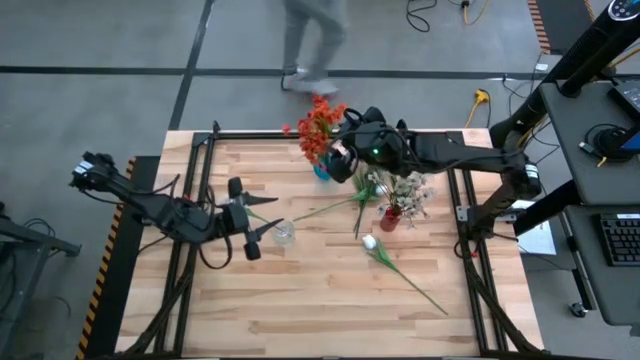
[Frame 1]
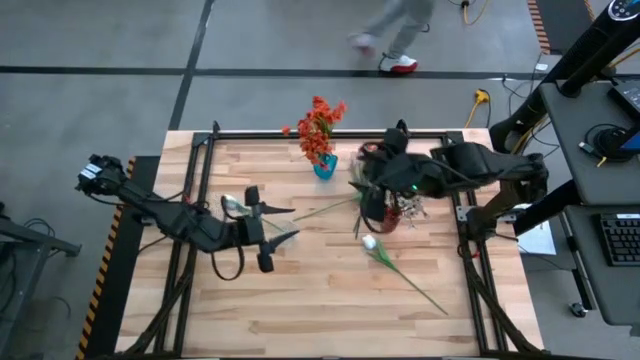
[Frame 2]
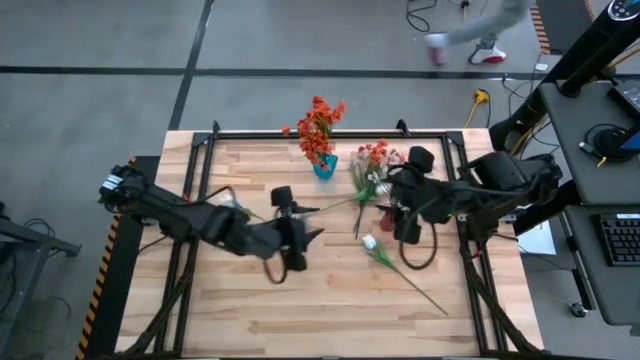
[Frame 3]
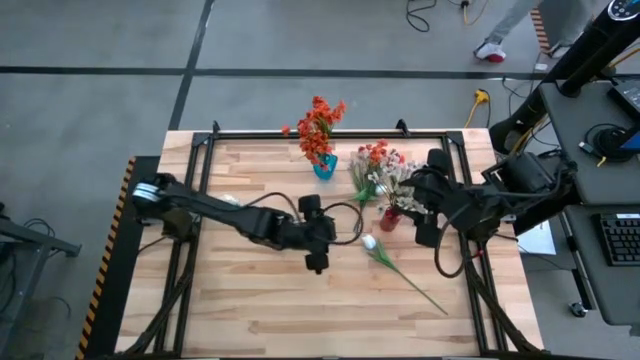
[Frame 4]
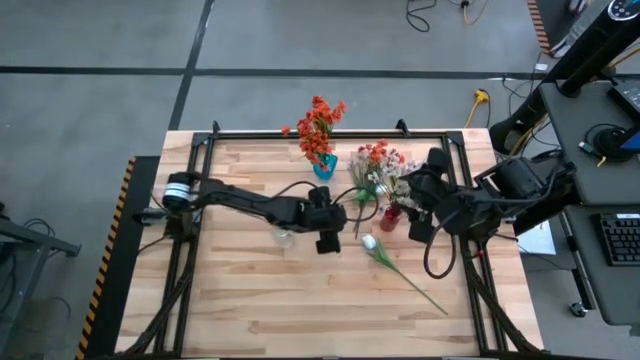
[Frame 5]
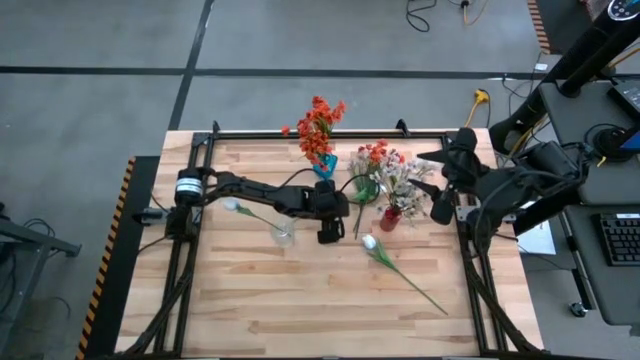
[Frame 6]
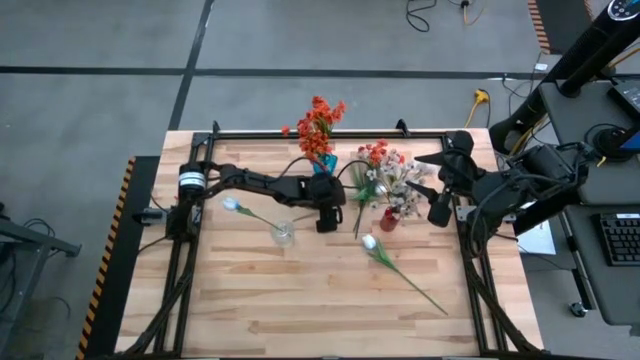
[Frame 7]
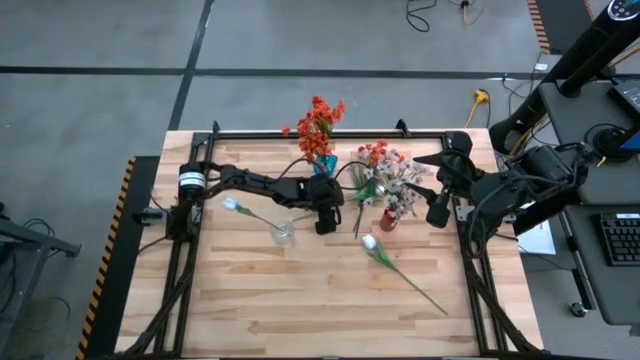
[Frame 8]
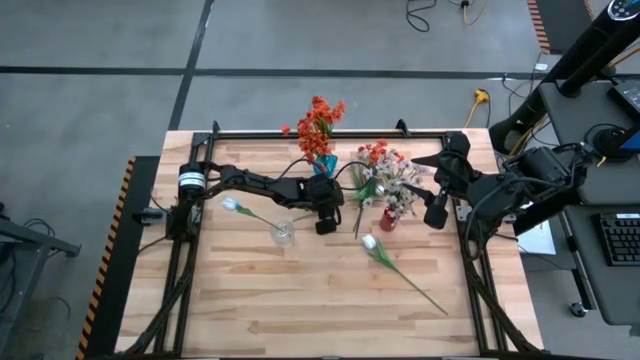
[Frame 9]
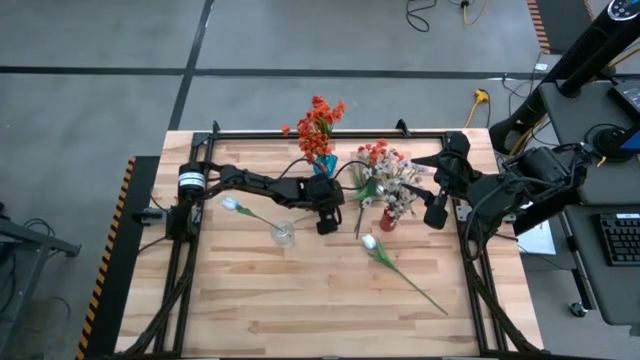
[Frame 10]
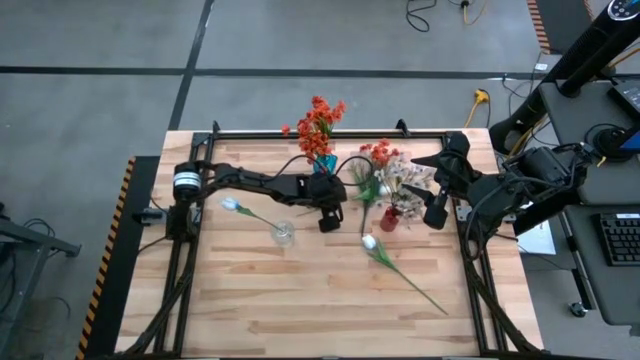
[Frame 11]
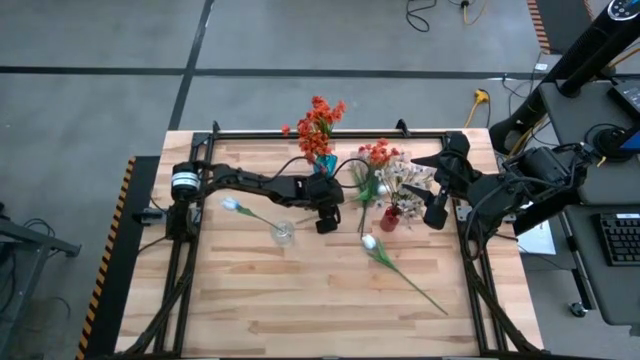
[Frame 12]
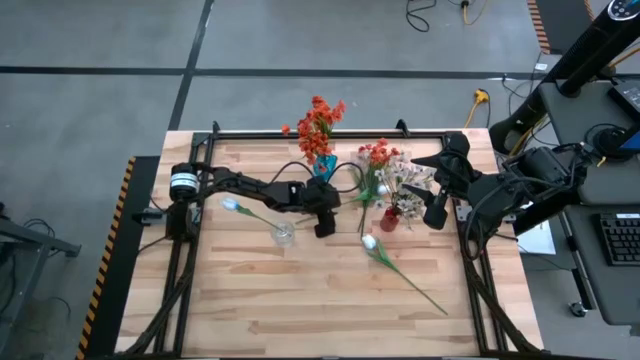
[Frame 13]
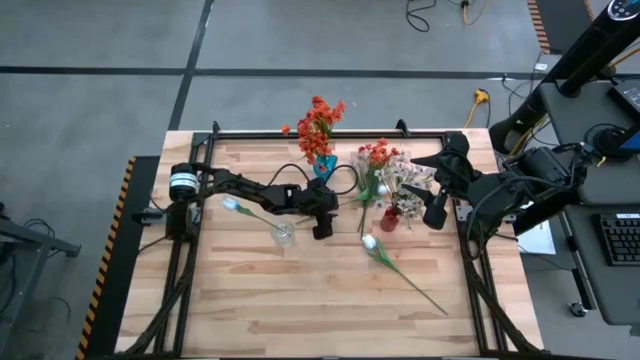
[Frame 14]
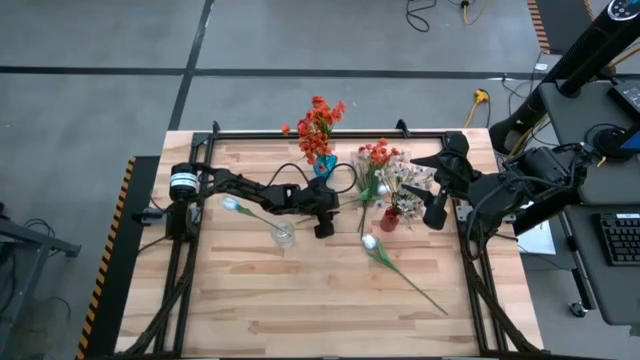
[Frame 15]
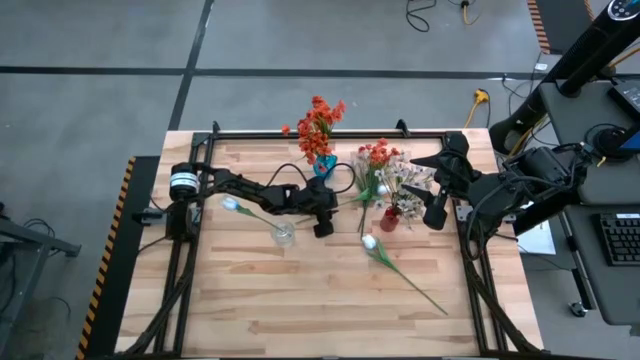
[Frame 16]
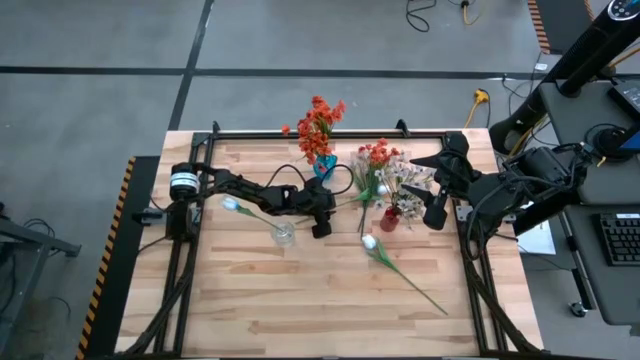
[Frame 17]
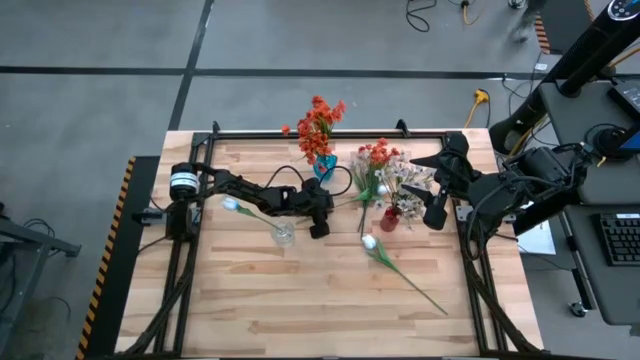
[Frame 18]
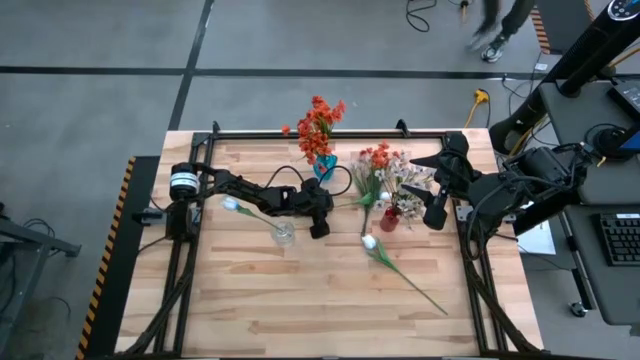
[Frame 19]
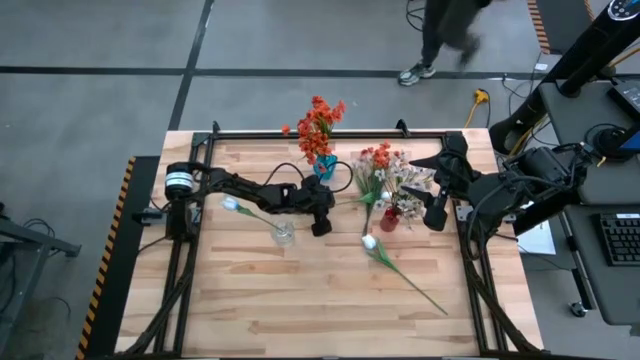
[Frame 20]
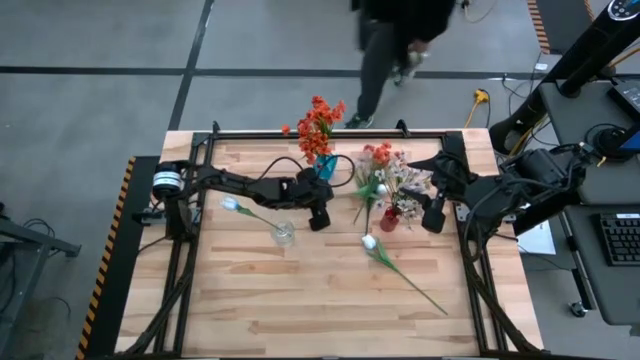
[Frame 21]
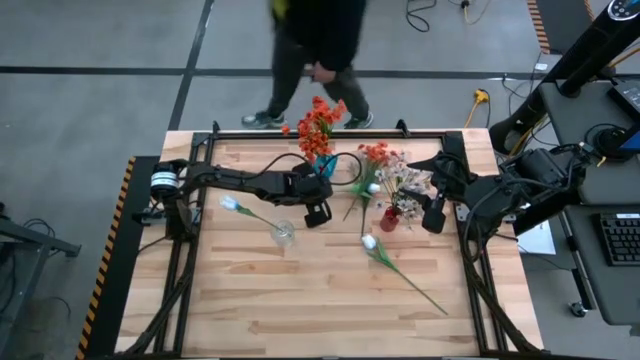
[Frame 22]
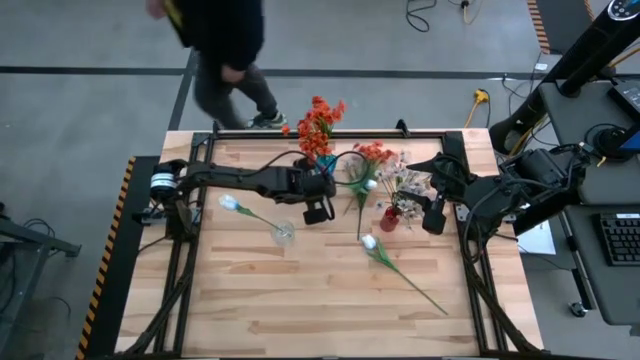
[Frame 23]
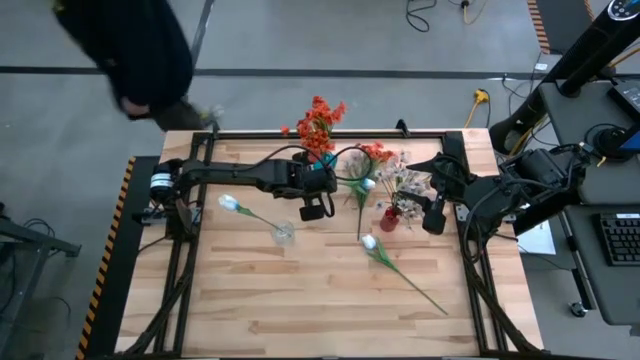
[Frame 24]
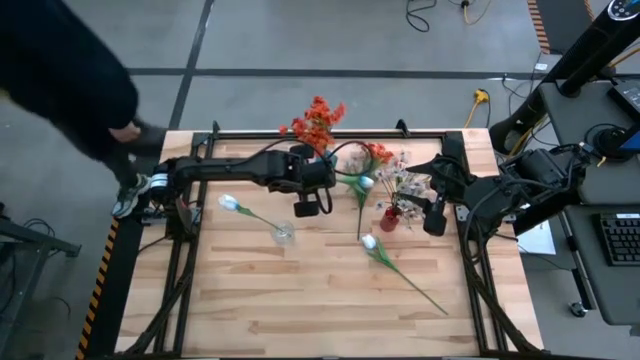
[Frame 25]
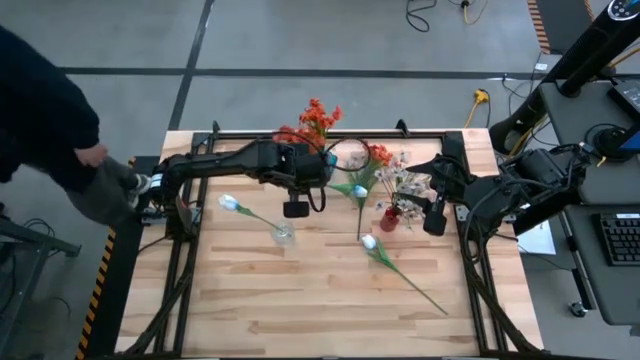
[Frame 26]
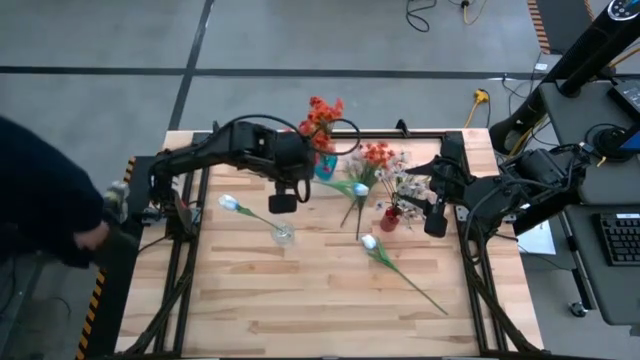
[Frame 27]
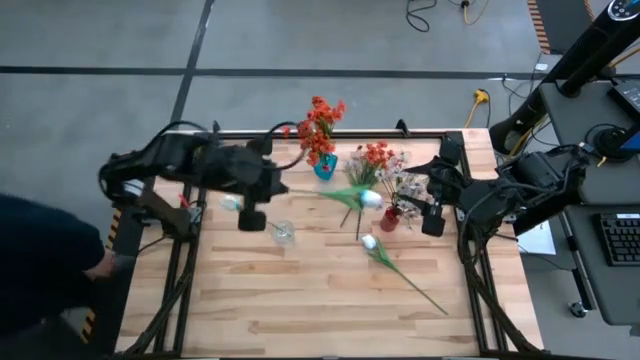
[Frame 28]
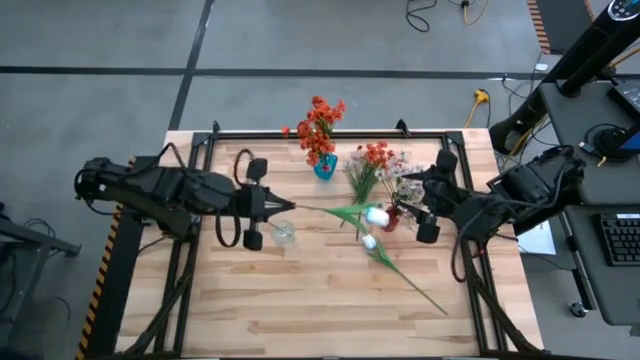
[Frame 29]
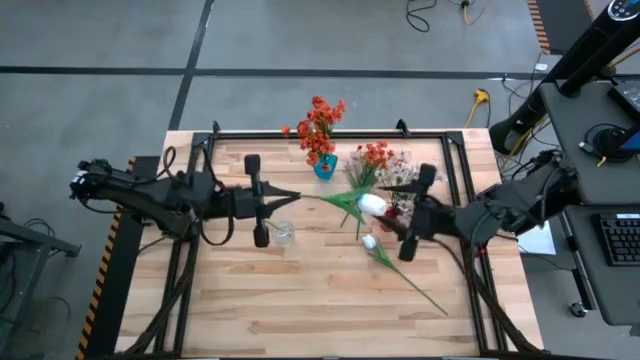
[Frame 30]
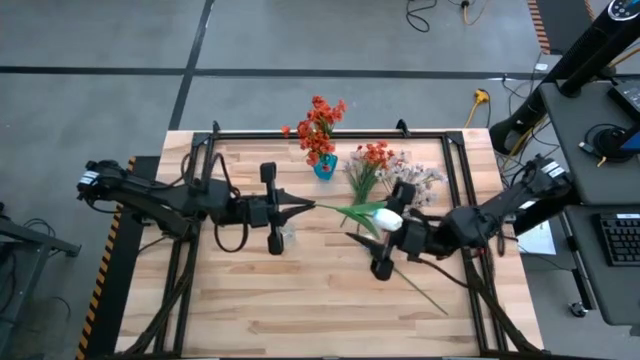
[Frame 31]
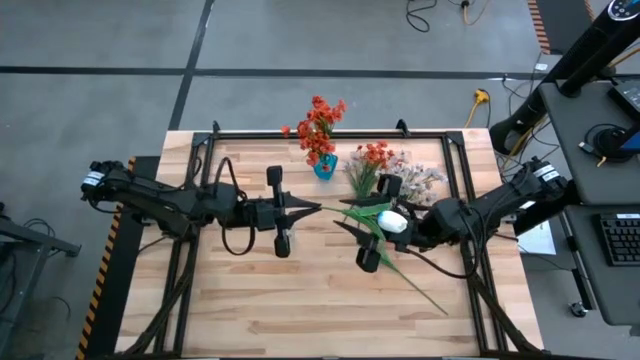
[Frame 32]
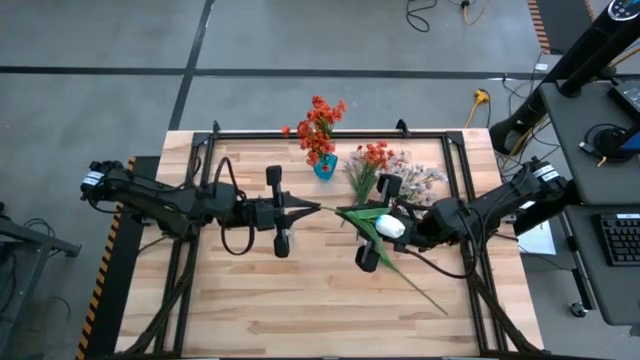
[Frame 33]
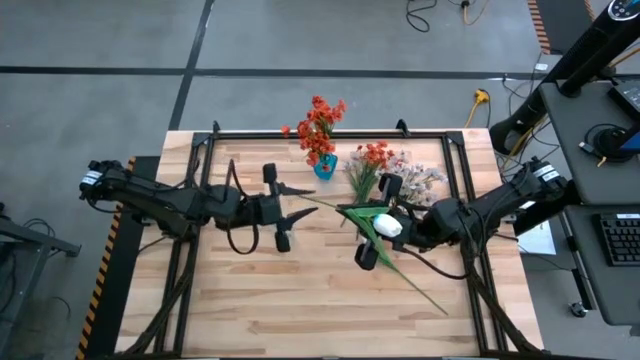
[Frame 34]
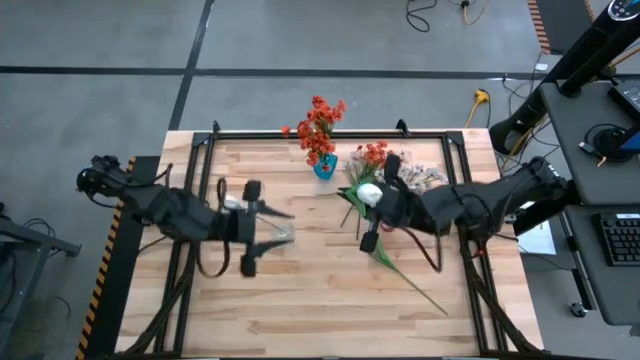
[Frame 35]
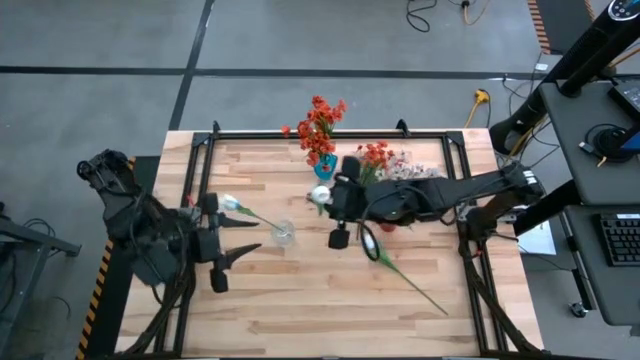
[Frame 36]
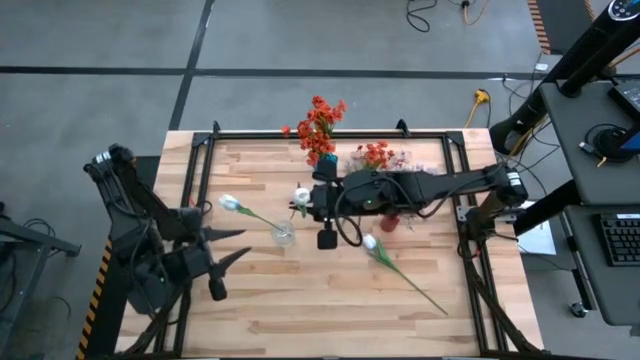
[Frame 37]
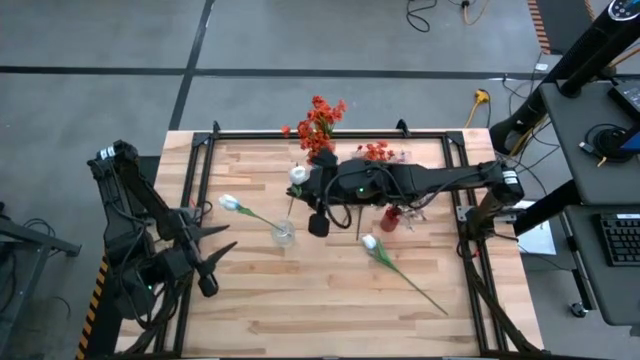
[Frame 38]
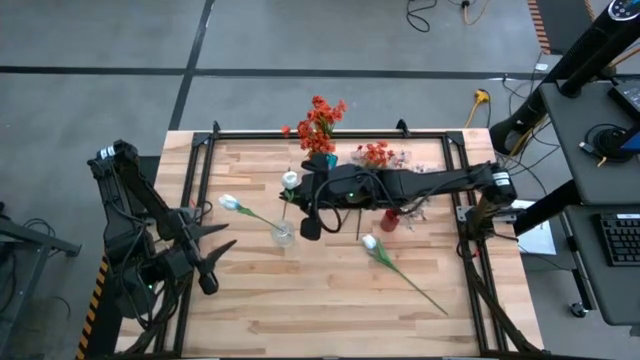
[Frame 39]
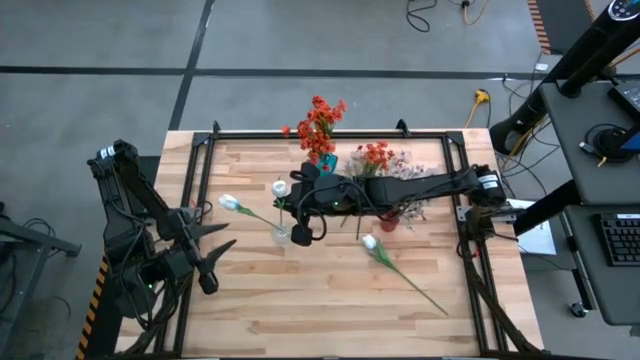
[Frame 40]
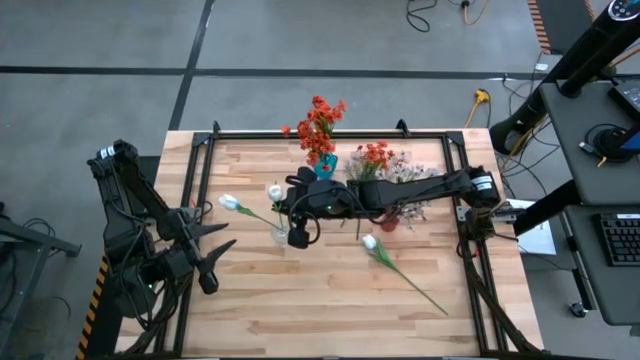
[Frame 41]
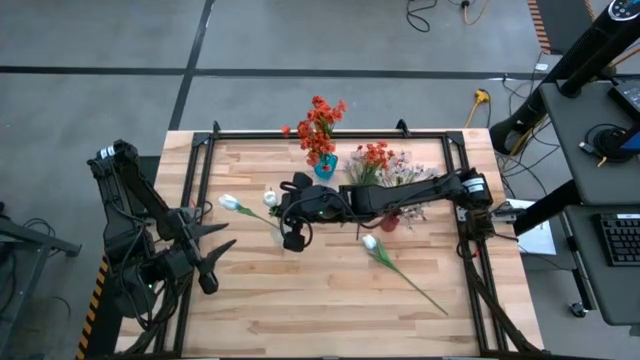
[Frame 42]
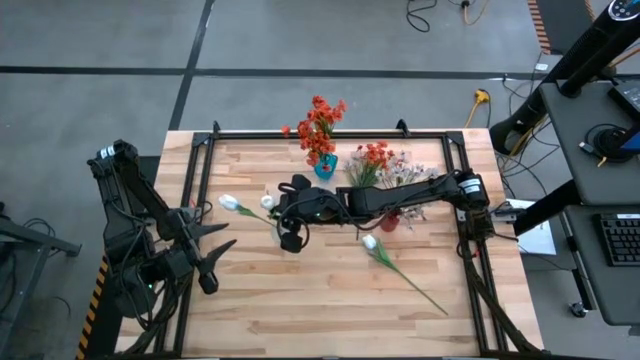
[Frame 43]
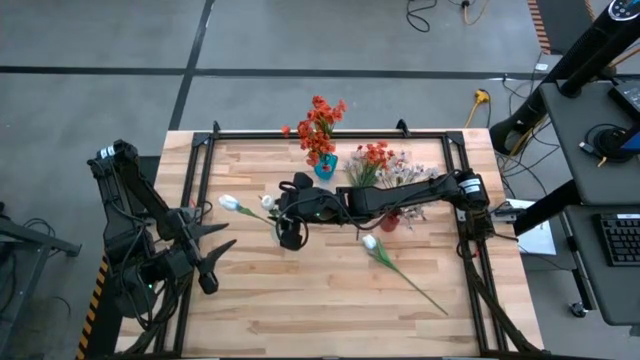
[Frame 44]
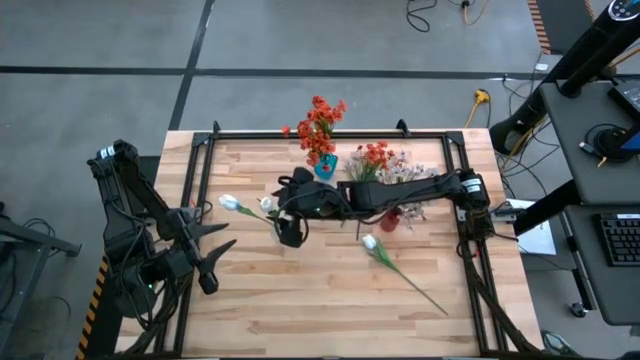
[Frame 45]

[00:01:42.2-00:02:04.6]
Task: Sort flowers into vase by color
Put the top white flower into the transparent vase
